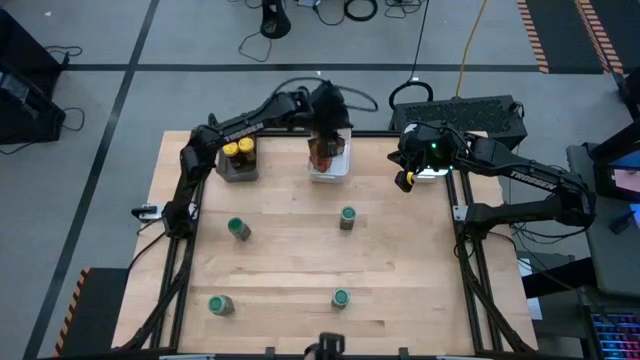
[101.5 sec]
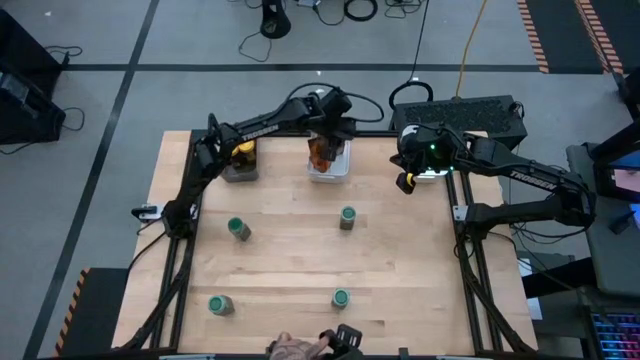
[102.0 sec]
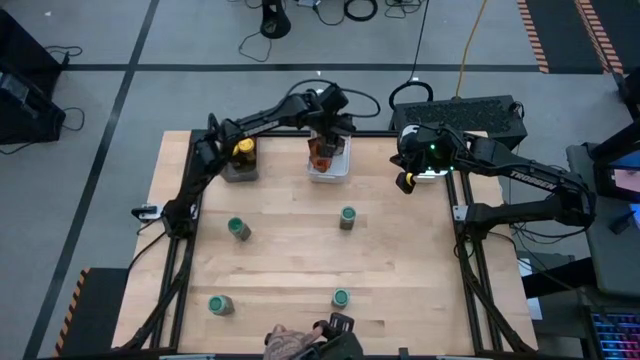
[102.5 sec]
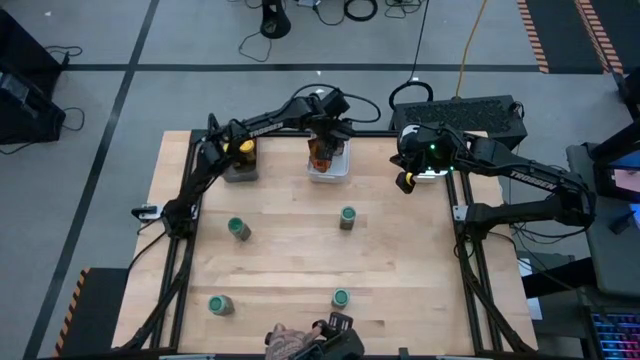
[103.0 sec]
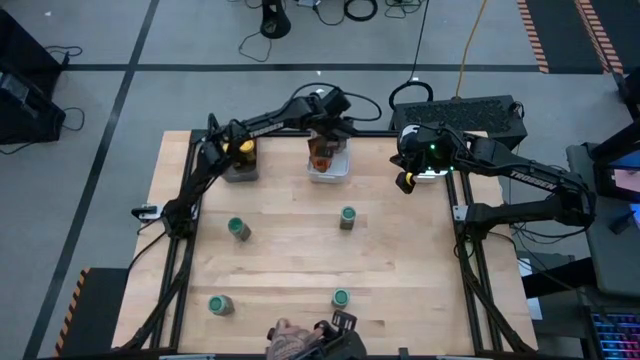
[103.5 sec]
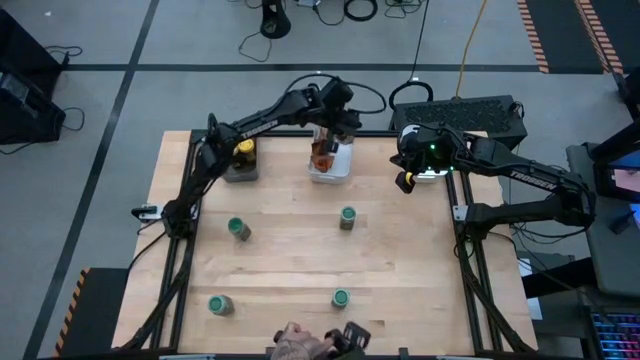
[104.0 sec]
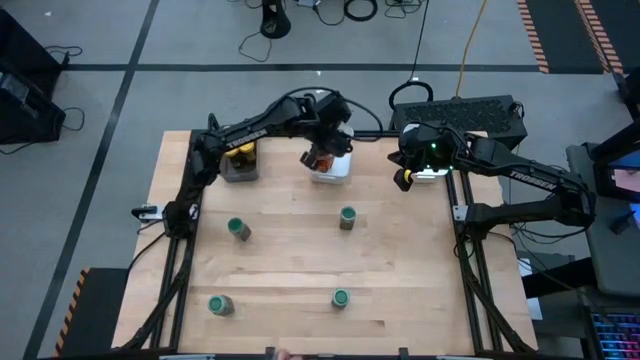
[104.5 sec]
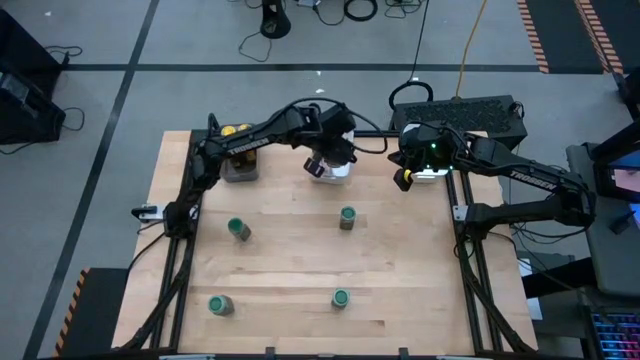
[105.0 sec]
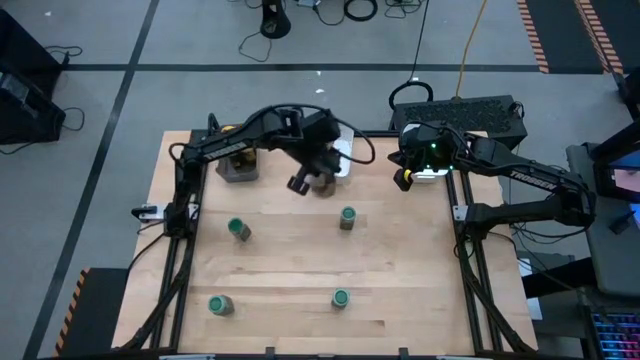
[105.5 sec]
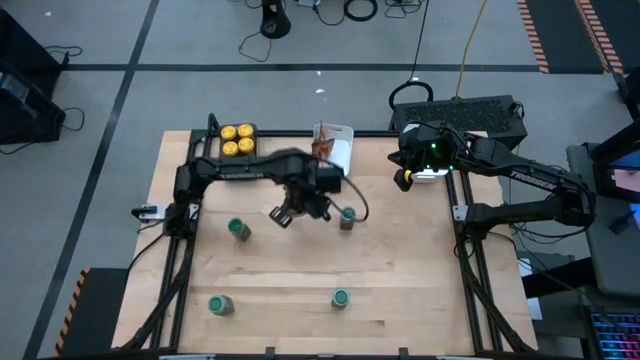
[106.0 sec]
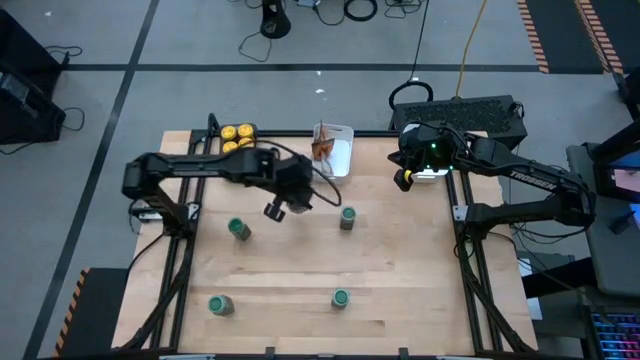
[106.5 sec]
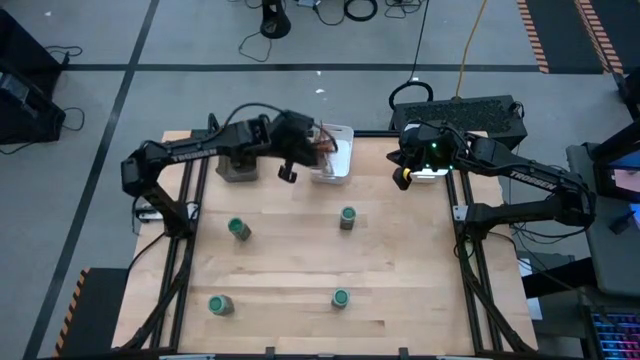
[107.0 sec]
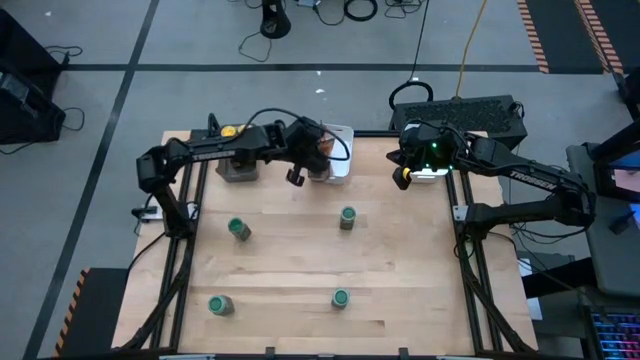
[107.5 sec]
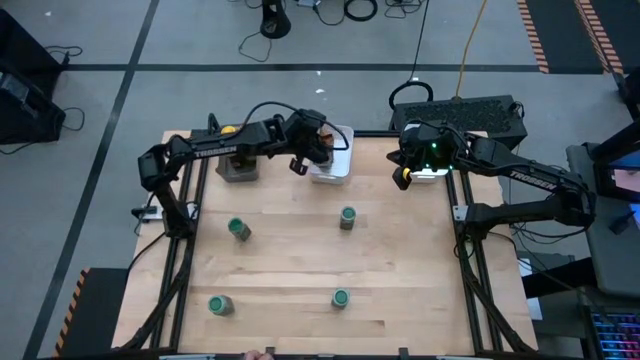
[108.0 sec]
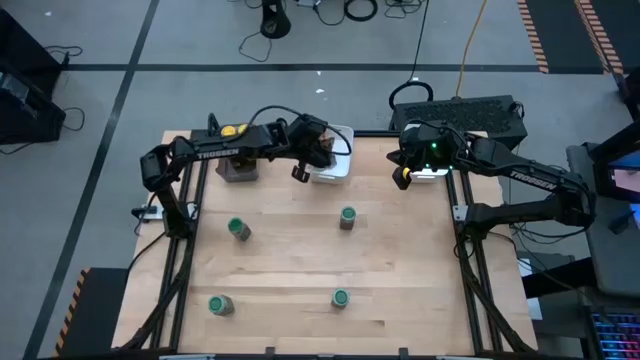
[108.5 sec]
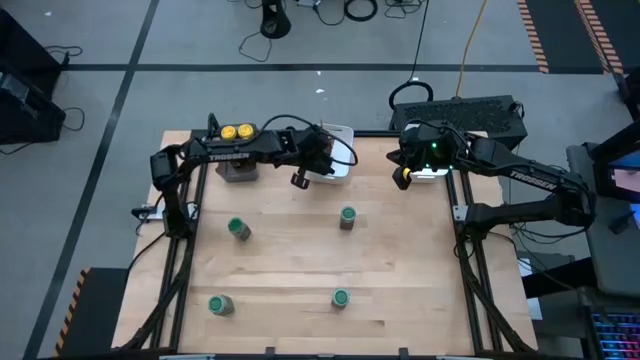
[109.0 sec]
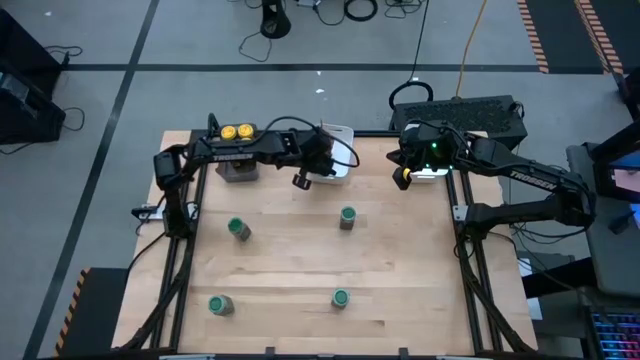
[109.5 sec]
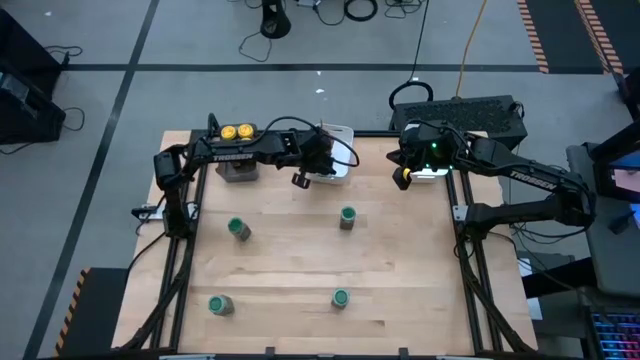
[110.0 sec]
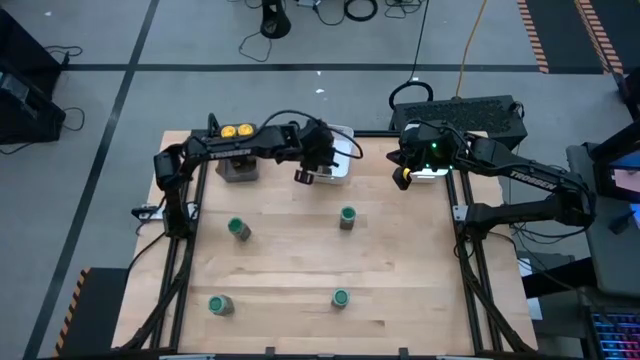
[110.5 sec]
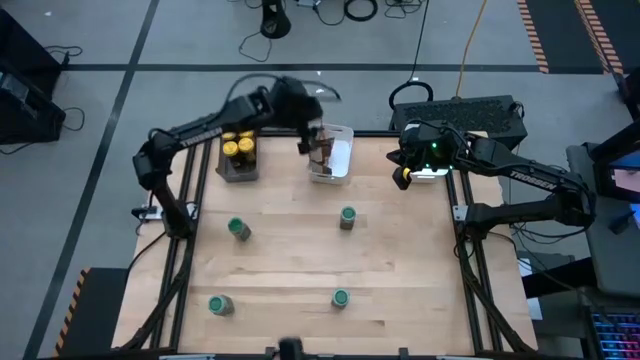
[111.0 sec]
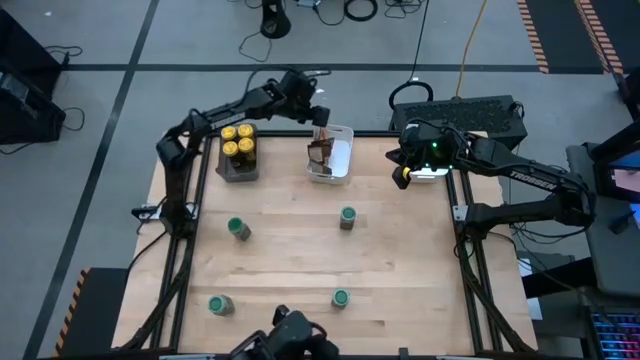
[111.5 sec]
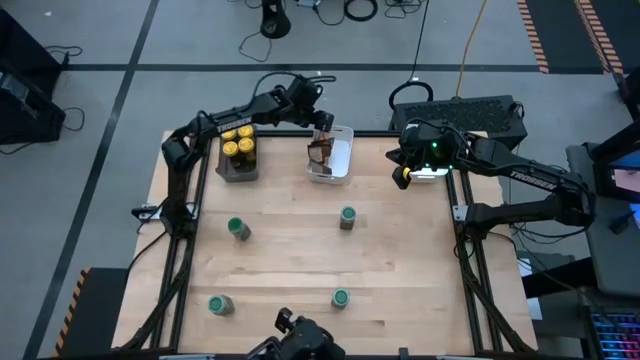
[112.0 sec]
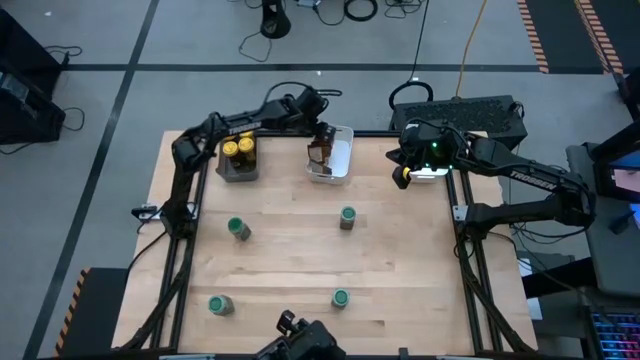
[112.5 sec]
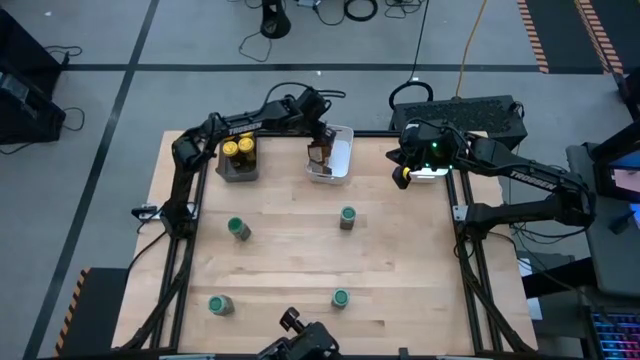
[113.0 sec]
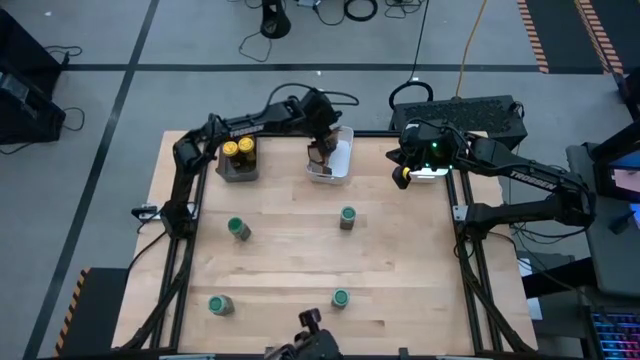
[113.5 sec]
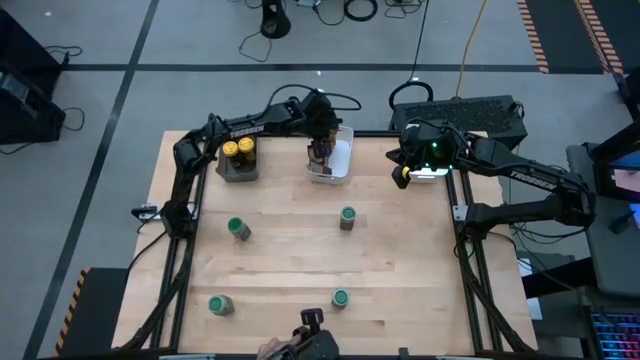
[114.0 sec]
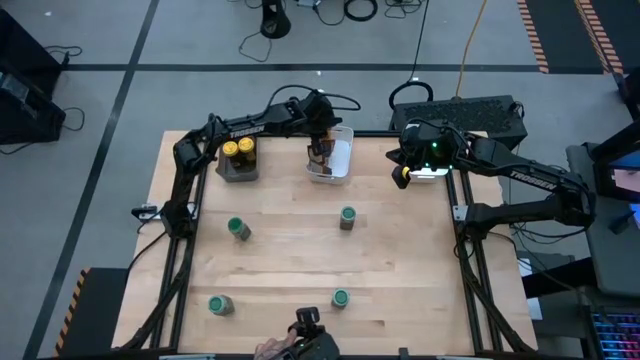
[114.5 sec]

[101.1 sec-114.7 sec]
Task: Sort spices by type
Adjust the brown seasoning packs in the left white bin

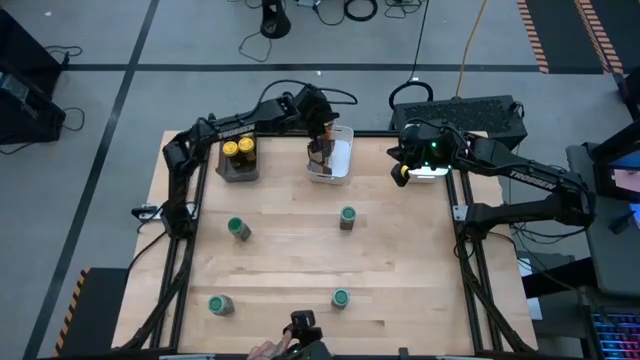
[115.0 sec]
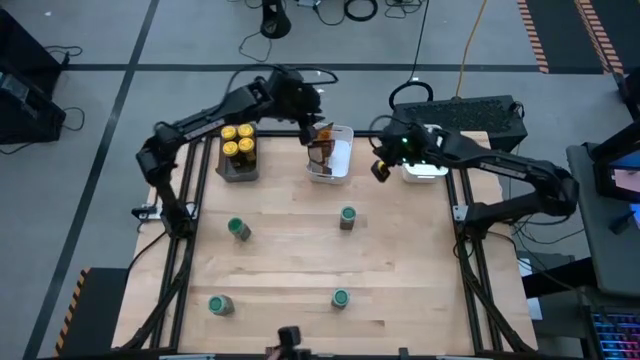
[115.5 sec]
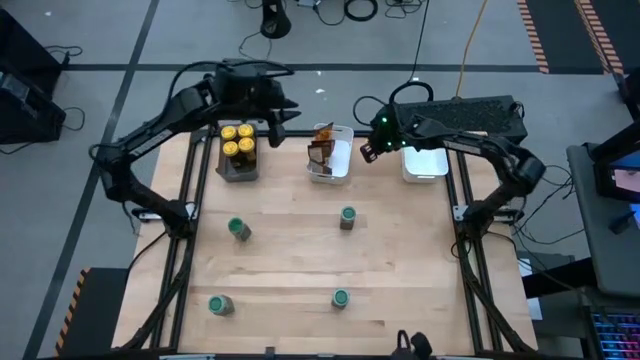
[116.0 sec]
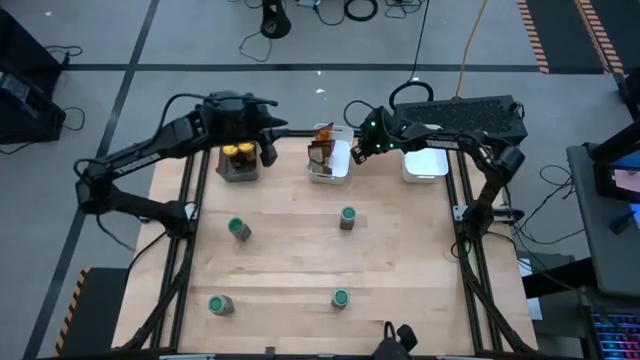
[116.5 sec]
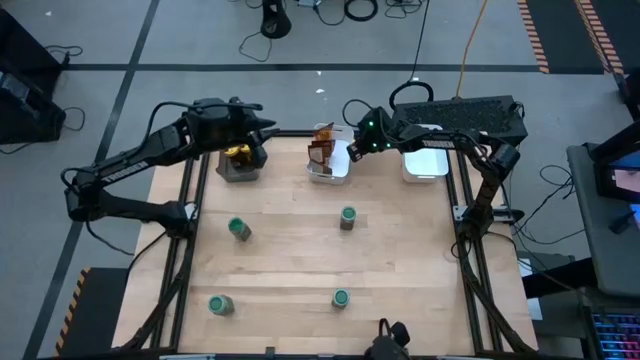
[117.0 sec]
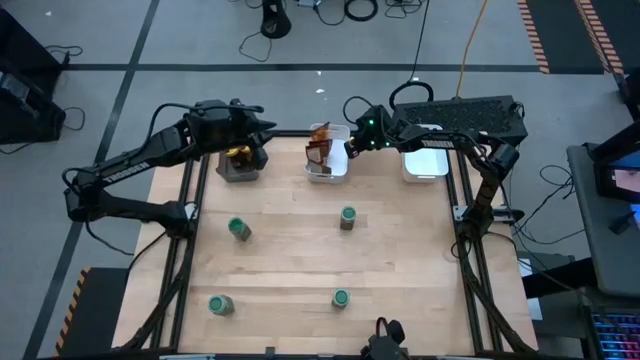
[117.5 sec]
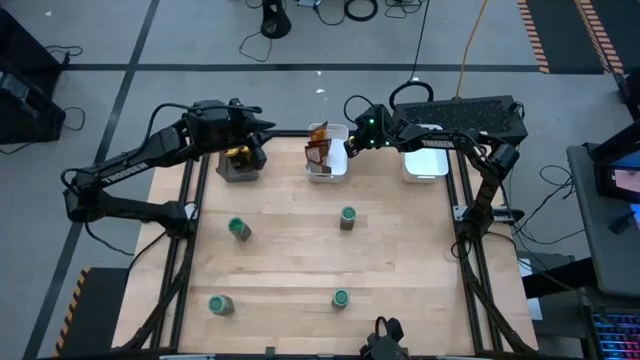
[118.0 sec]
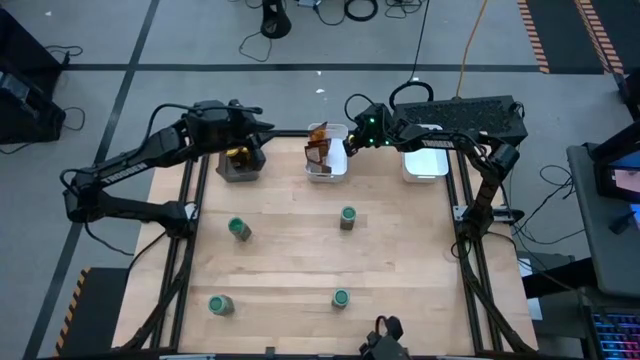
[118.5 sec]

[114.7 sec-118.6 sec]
Adjust the left white bin to align with the other bins

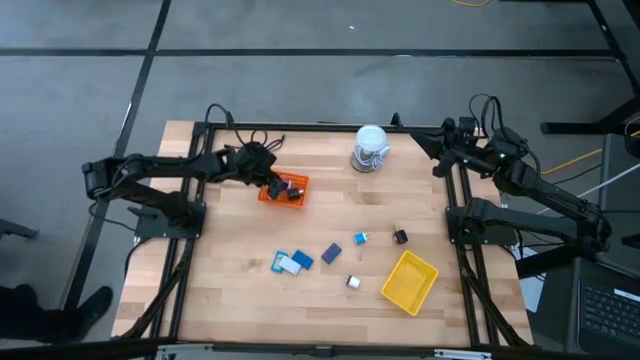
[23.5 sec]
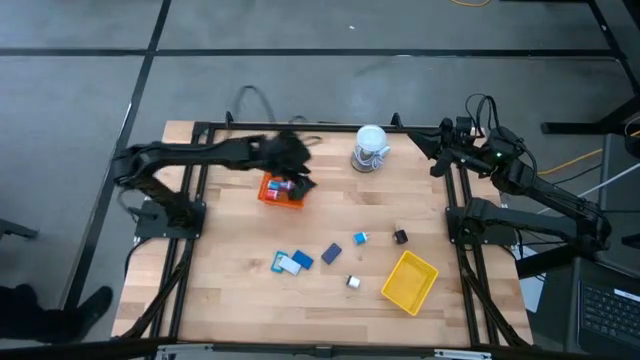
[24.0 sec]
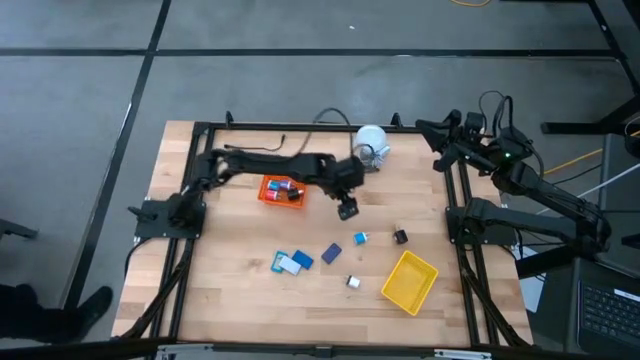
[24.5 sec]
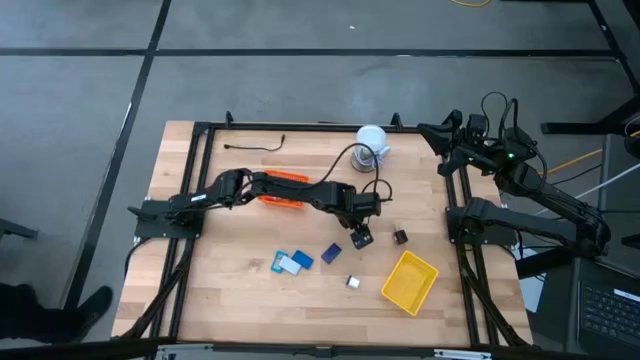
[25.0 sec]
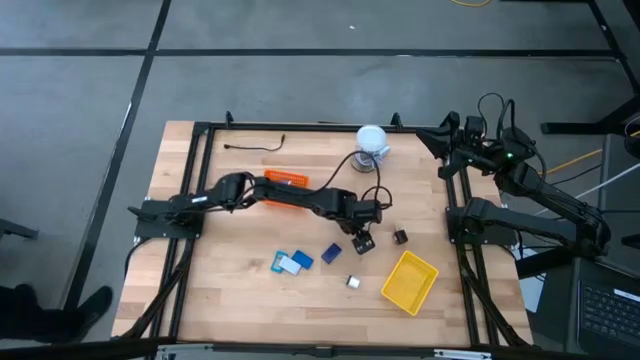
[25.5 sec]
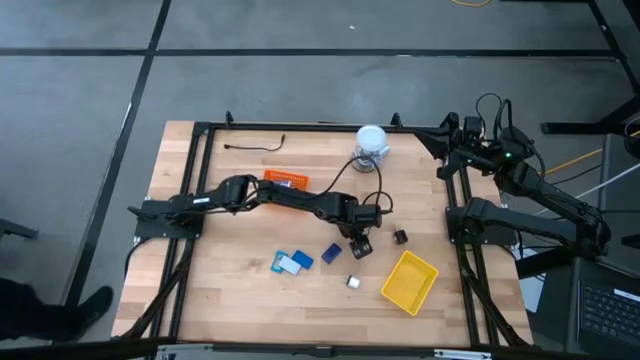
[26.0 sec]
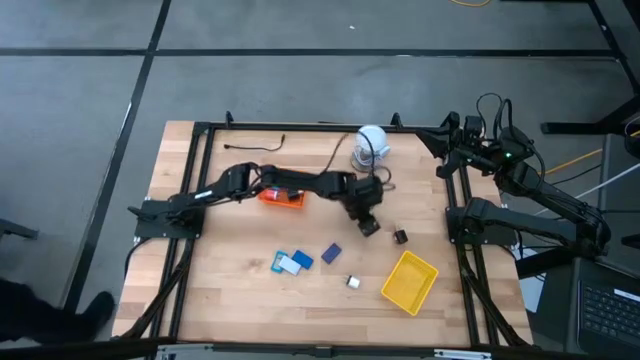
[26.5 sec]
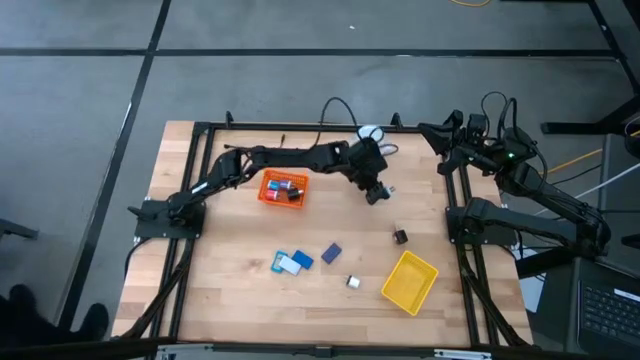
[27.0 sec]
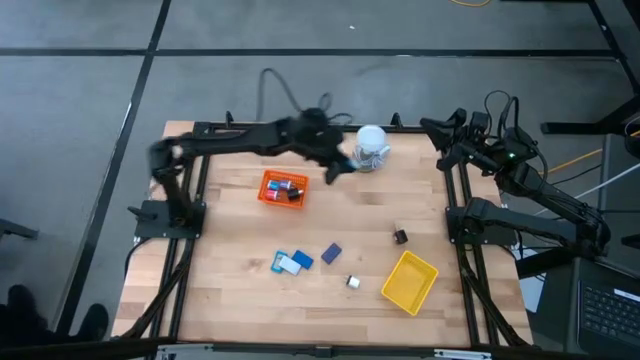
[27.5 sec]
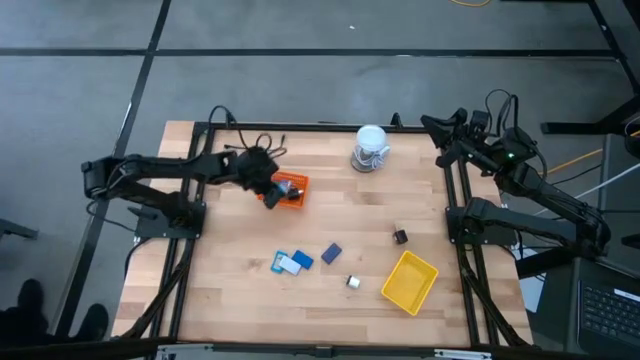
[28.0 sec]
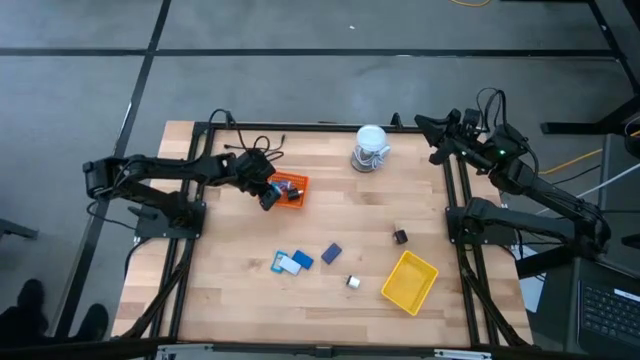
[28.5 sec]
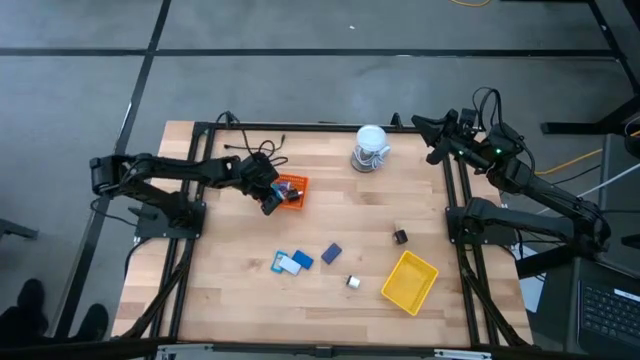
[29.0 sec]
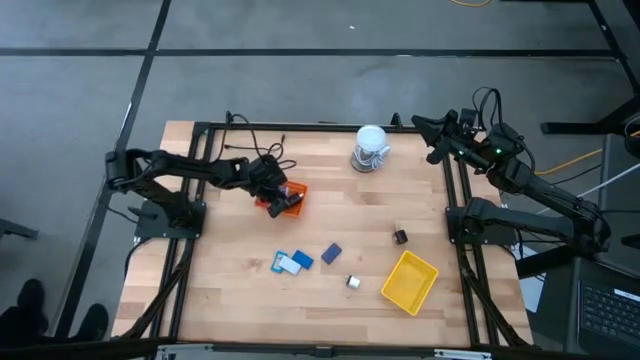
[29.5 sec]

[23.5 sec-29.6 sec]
Task: Pick & Place Office items
Put the blue charger adapter into the orange basket
